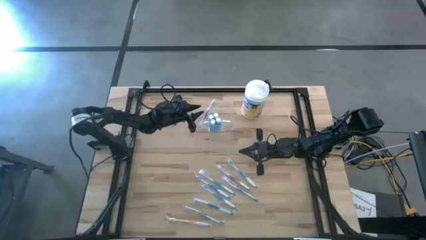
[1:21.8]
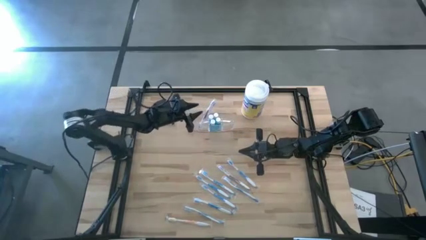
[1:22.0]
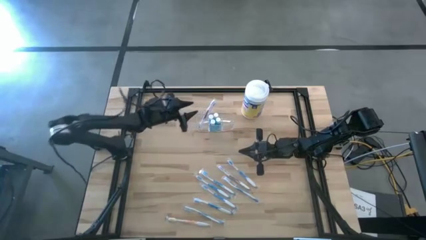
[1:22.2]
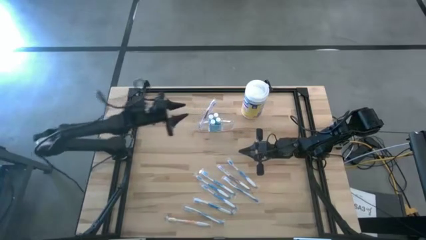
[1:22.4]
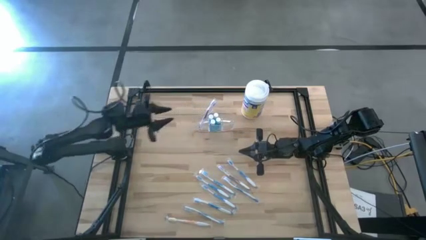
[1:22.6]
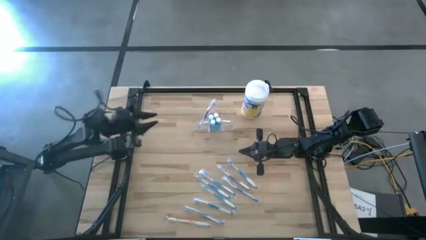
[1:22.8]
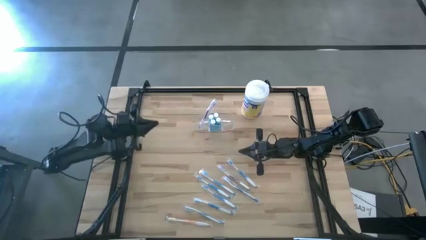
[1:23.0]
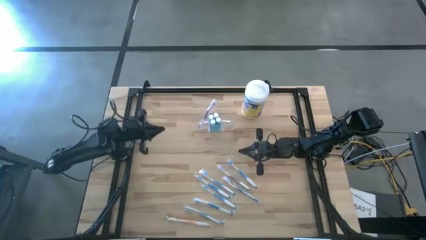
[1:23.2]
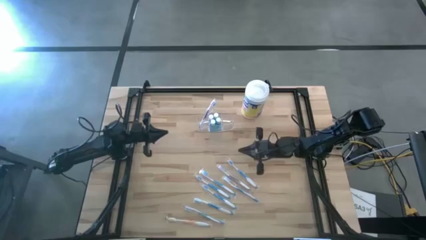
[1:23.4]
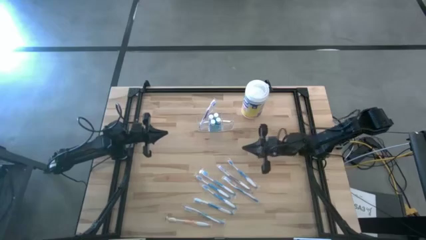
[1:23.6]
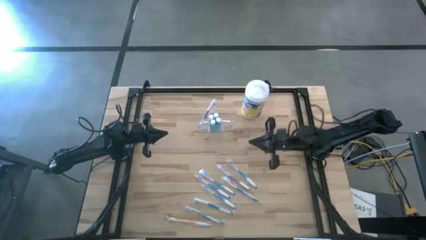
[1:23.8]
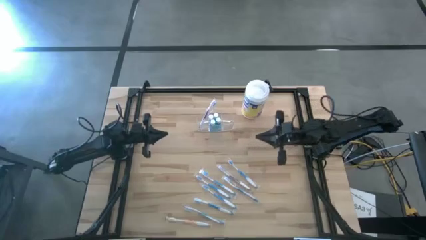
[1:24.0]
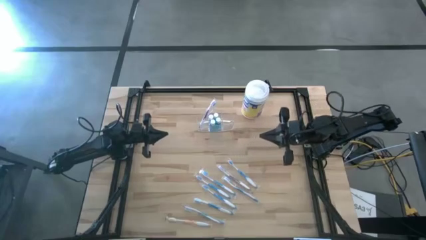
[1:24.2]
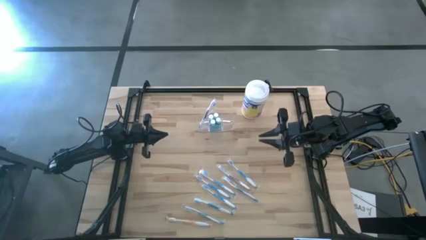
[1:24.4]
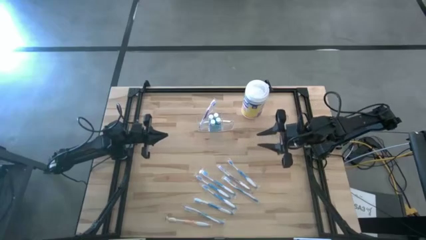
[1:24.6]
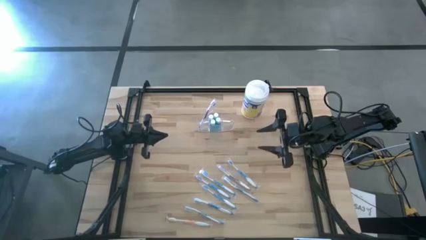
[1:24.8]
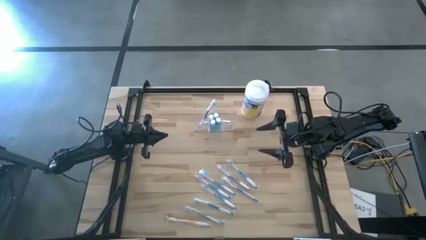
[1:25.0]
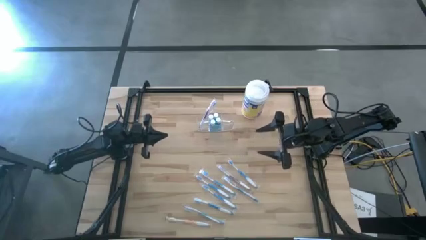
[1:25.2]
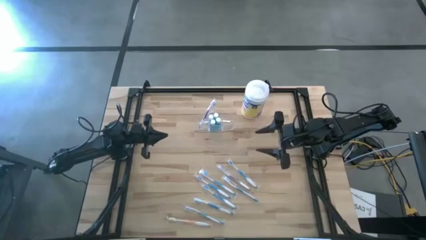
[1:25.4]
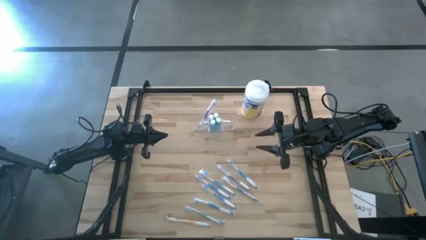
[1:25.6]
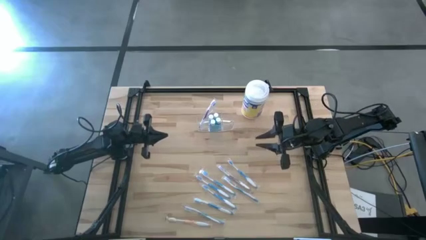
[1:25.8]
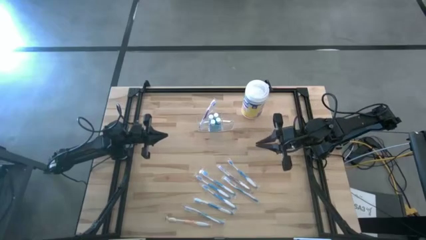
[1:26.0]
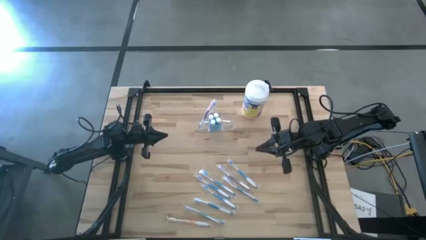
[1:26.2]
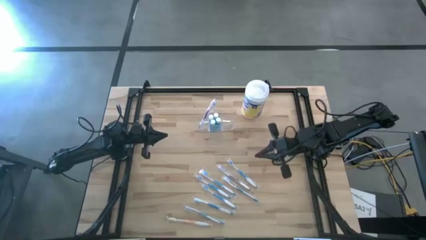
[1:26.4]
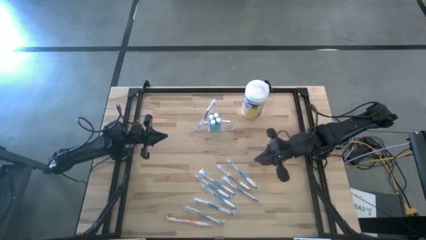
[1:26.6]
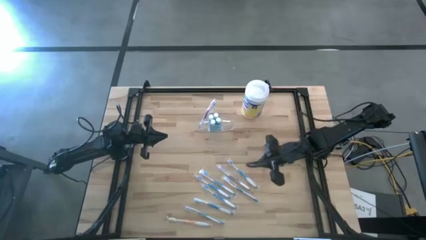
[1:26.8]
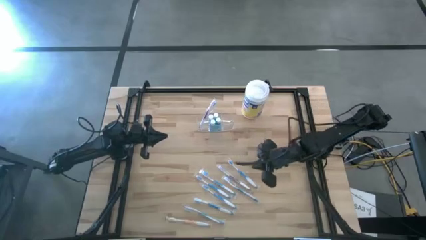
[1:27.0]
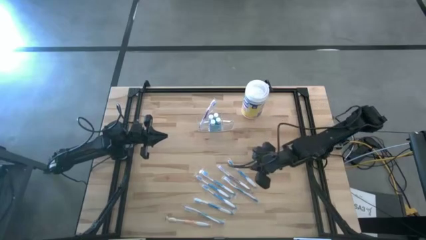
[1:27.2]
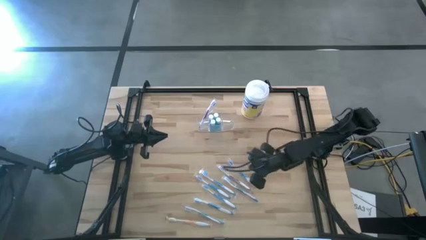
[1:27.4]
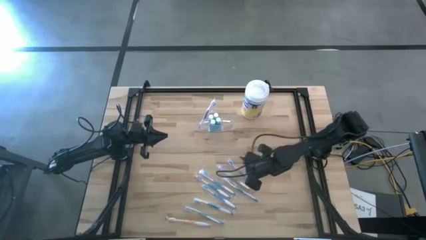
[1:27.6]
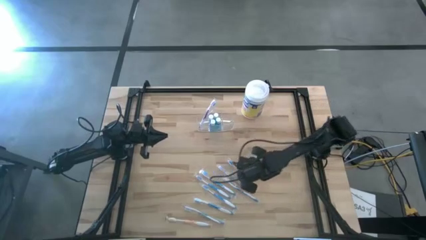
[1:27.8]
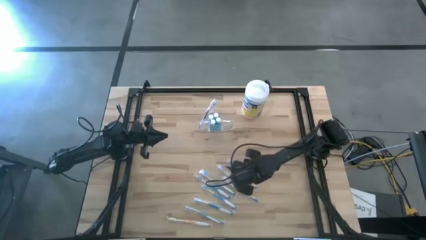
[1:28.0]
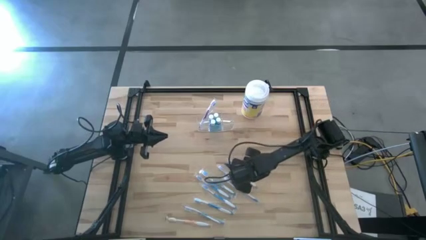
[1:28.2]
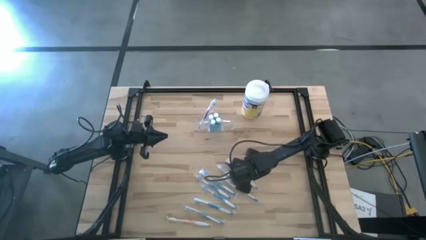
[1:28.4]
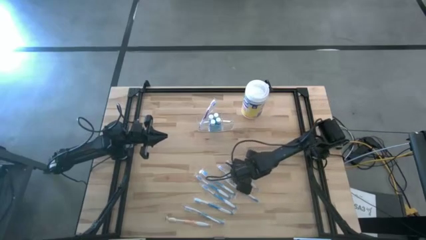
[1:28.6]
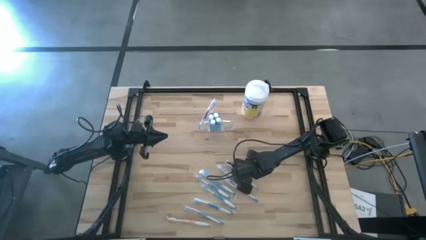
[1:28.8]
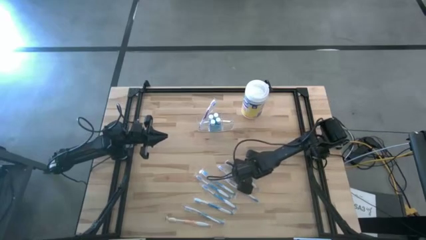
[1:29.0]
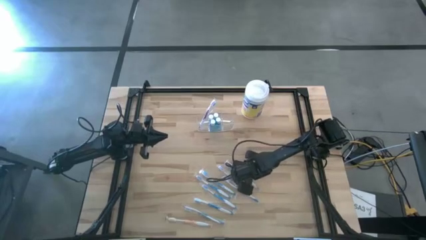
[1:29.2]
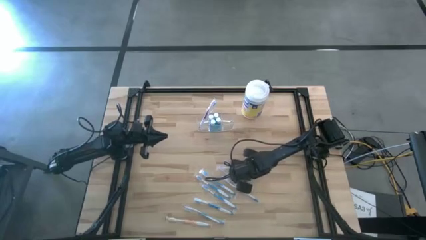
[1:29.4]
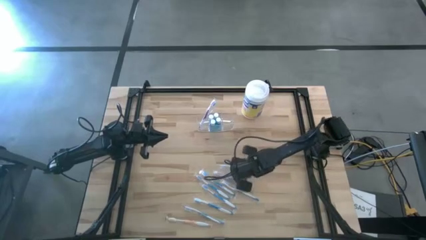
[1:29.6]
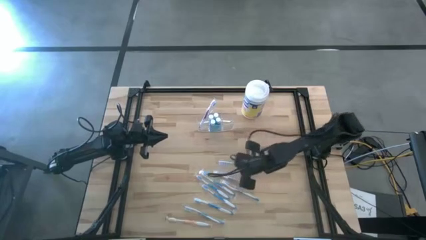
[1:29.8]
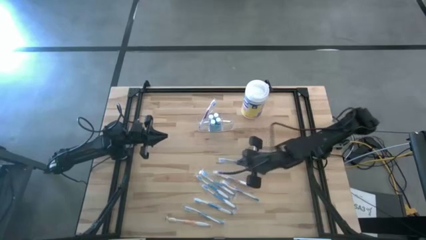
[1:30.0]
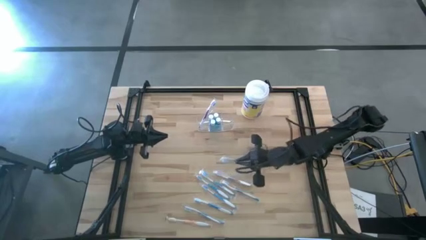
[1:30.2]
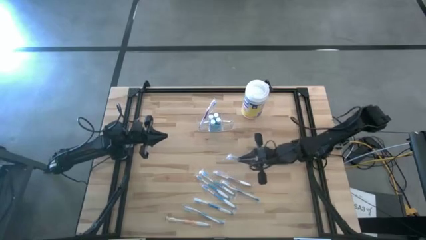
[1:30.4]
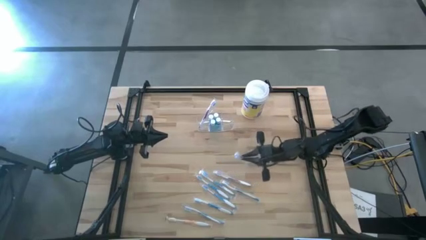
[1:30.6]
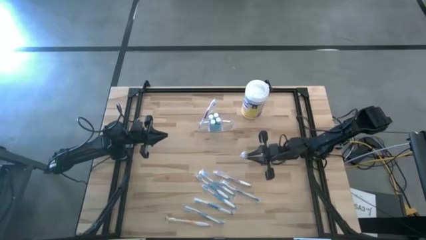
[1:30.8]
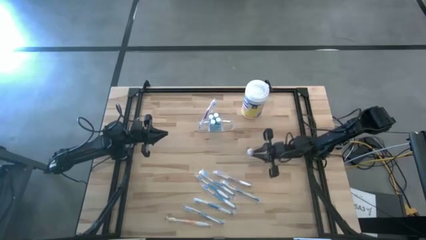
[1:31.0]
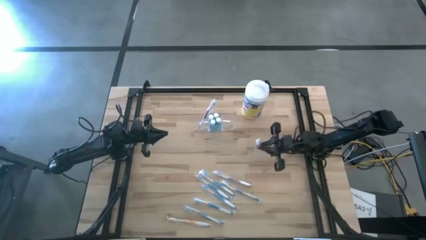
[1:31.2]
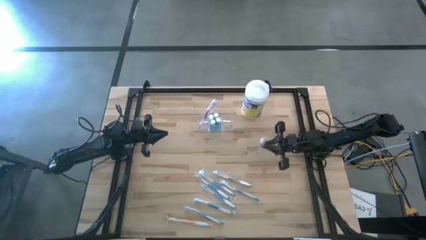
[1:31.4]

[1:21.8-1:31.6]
Task: Pick & Place toothbrushing station
Put the blue toothbrush into the left section of the transparent organizer

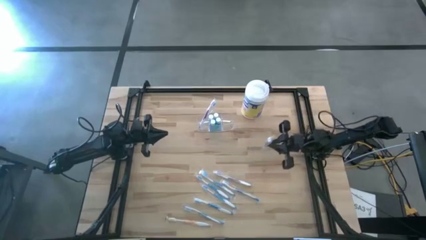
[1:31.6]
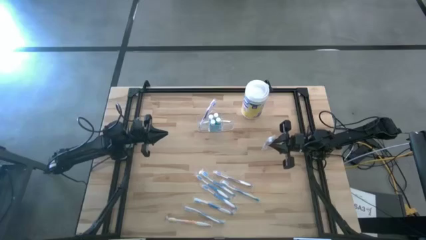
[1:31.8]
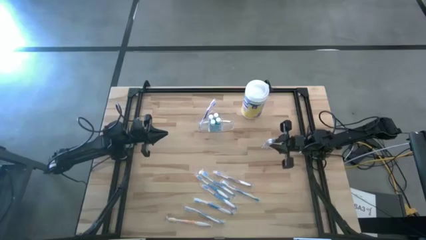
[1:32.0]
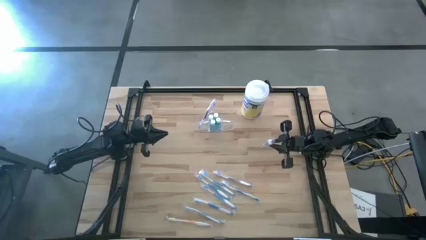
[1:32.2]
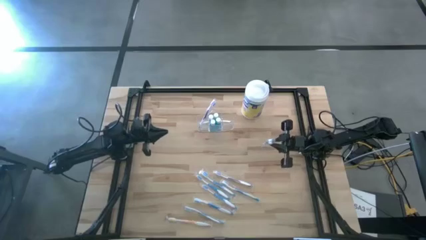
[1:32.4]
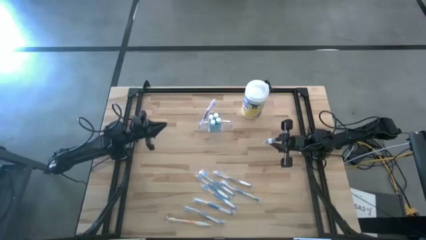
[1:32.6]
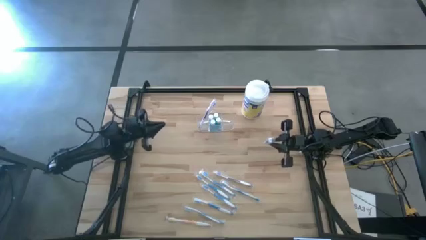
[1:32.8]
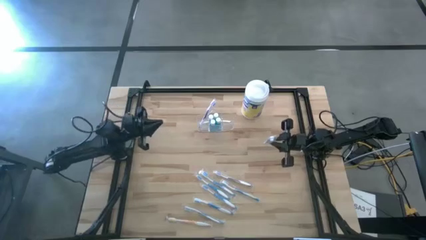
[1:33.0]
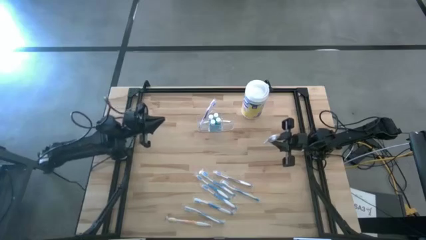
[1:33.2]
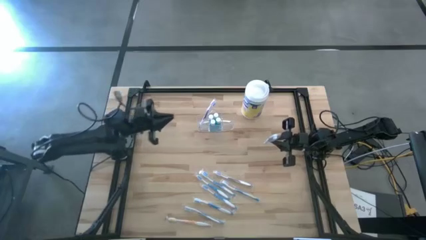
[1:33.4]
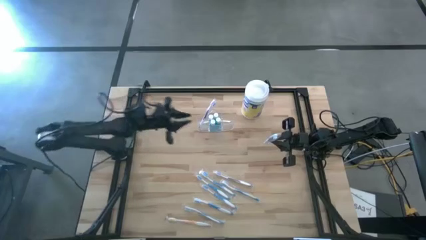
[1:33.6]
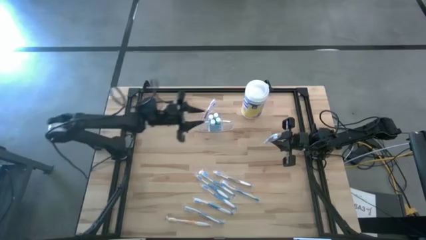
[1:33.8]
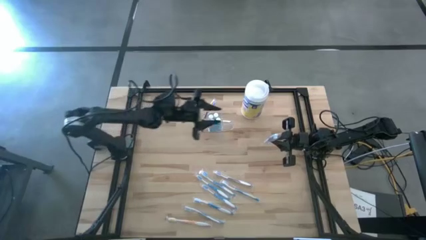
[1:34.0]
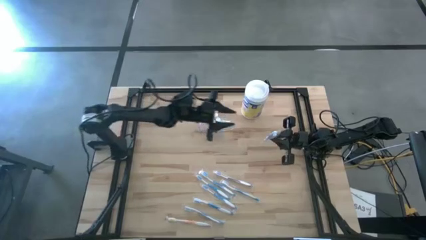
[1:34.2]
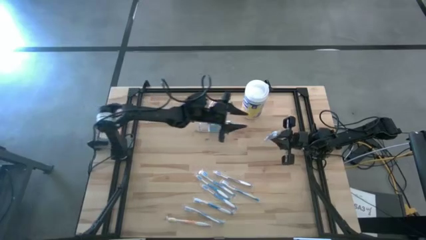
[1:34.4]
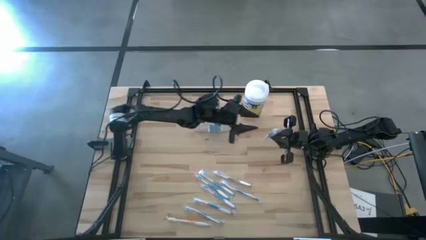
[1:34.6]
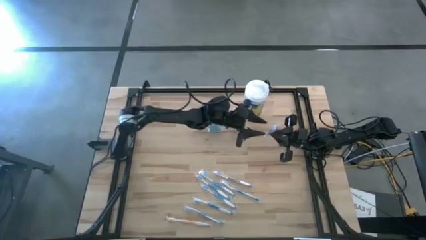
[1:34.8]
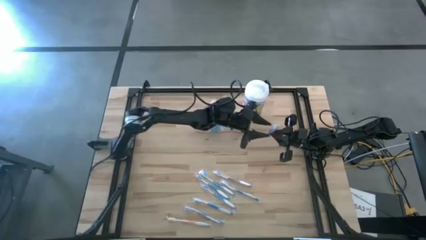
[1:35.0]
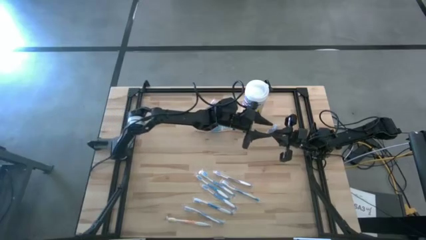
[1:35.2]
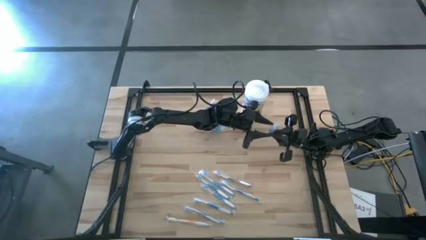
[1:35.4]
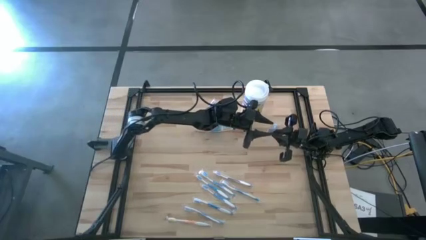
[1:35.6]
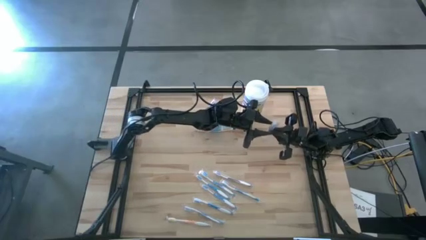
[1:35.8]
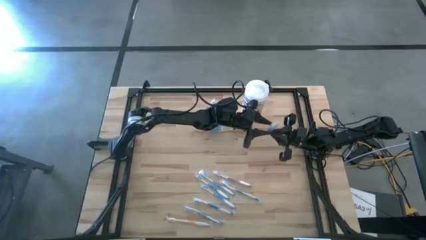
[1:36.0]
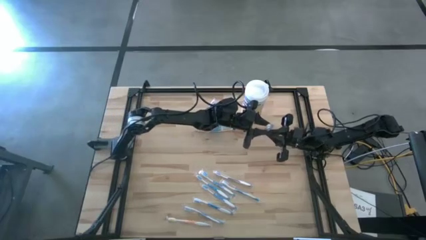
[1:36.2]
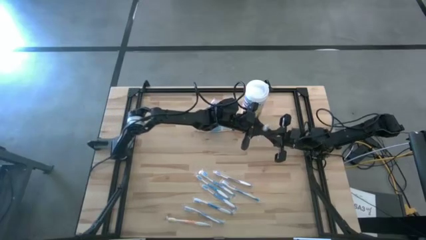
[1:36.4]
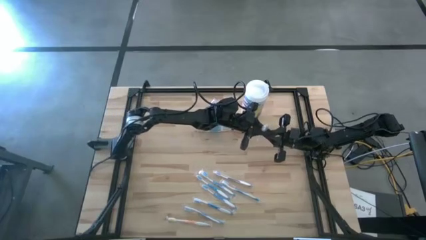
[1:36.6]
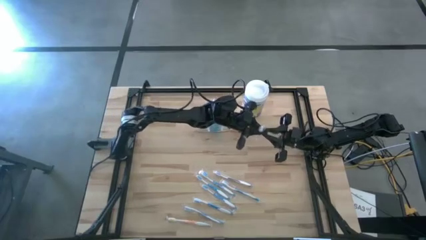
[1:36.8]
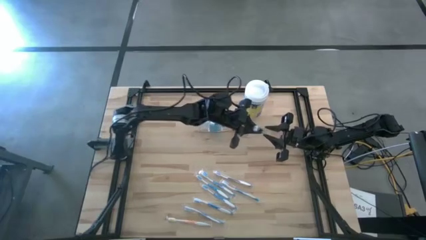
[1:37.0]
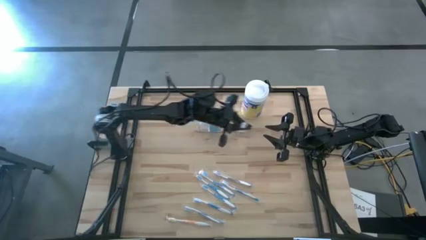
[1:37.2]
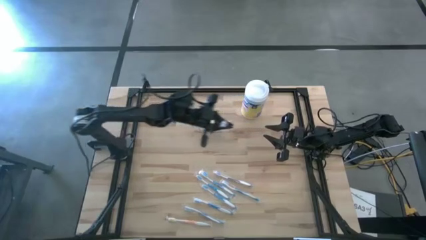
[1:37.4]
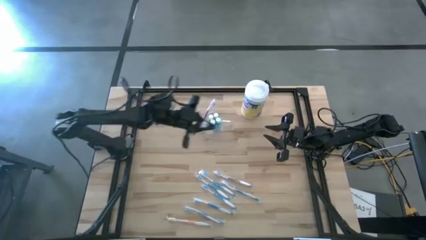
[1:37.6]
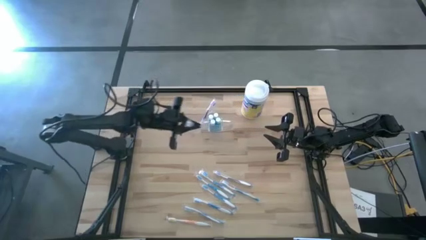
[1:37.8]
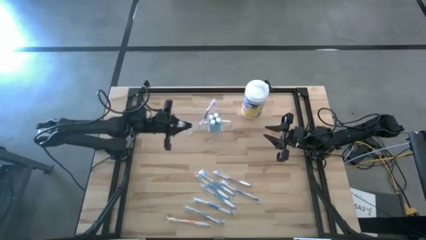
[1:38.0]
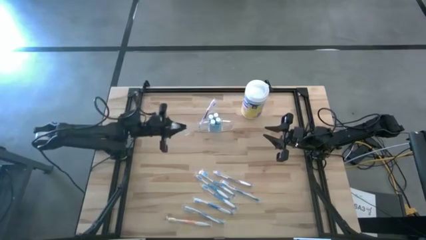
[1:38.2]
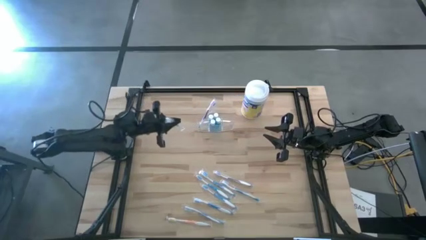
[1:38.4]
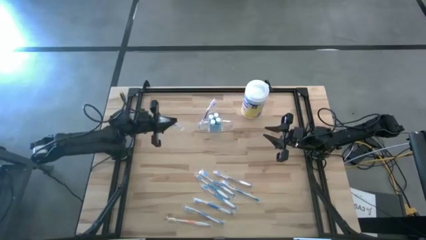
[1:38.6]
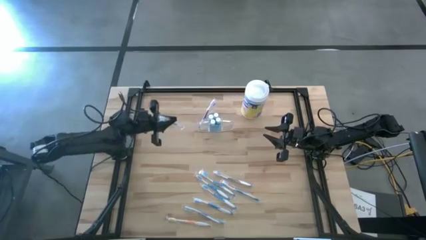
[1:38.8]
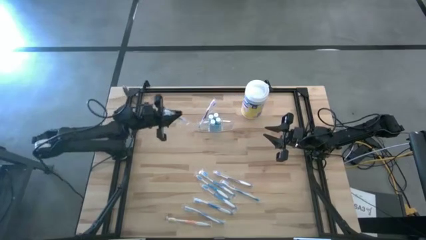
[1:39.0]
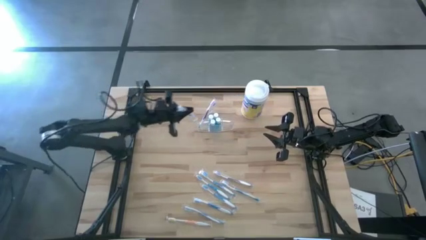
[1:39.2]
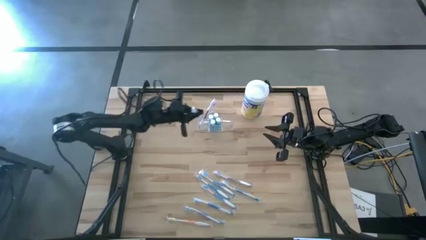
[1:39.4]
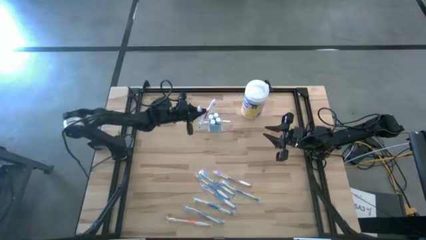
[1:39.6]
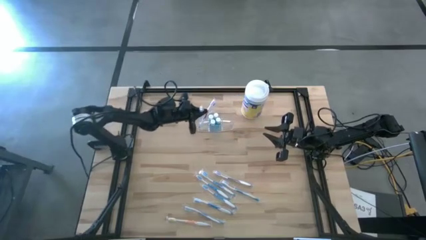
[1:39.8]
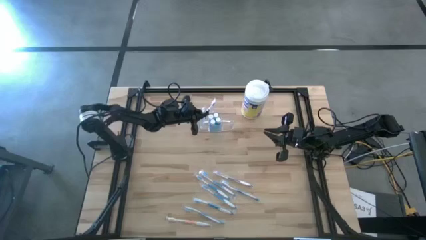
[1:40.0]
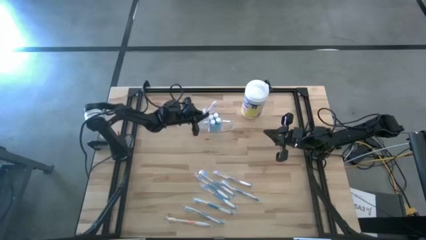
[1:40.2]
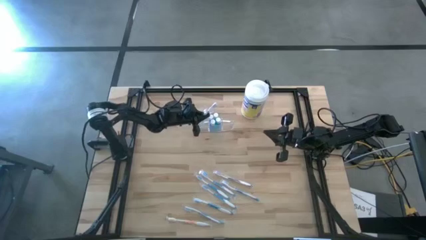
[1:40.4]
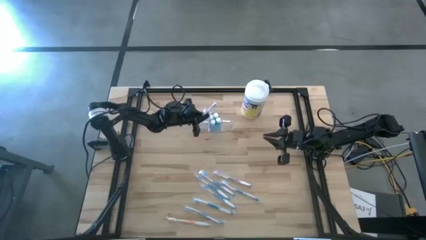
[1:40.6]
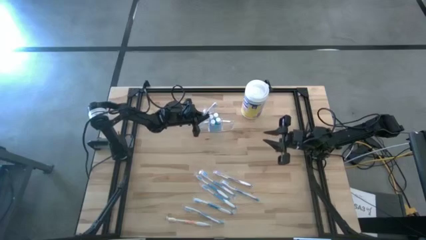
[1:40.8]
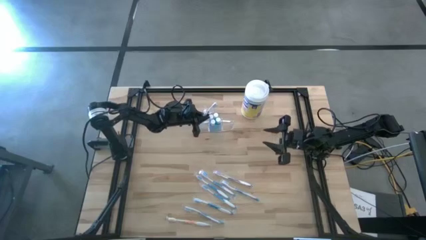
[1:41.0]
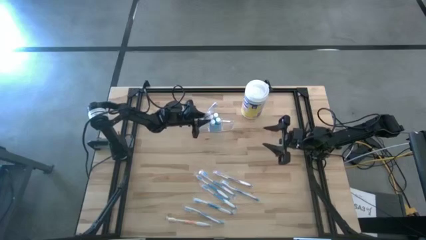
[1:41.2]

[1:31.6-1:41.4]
Put the blue toothbrush into the left section of the transparent organizer
